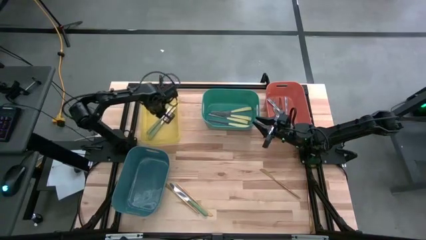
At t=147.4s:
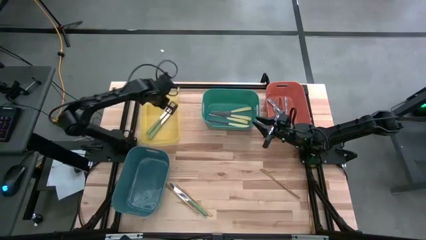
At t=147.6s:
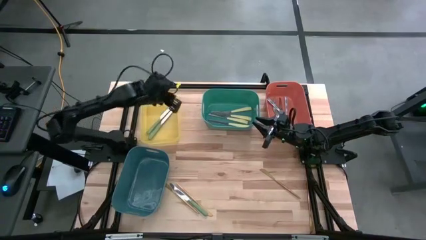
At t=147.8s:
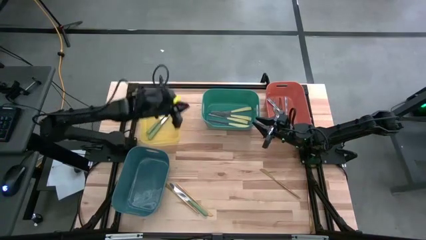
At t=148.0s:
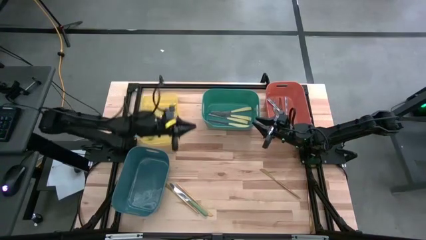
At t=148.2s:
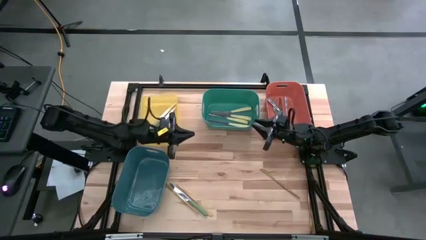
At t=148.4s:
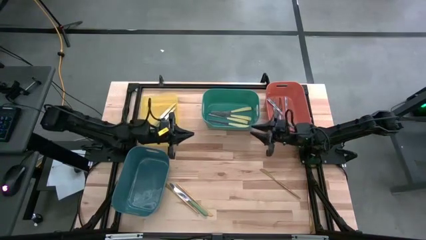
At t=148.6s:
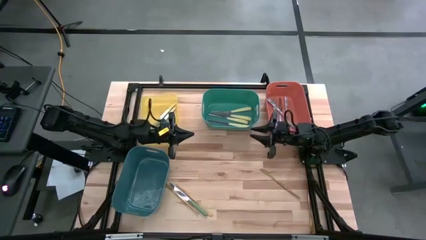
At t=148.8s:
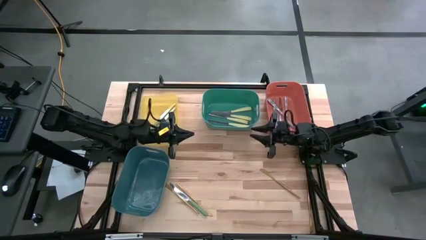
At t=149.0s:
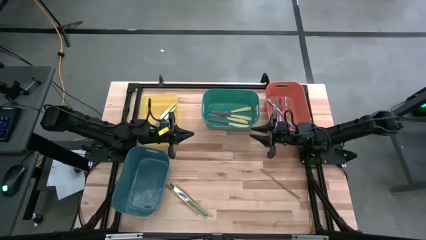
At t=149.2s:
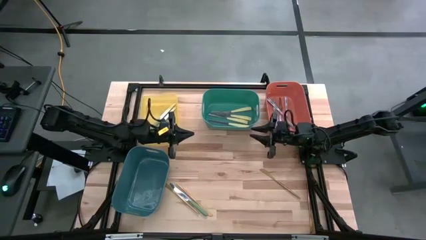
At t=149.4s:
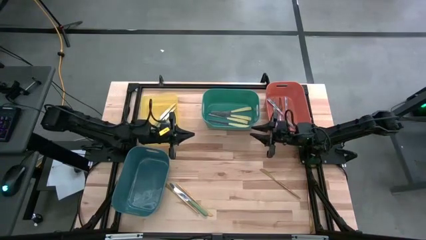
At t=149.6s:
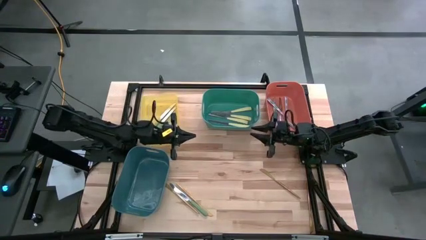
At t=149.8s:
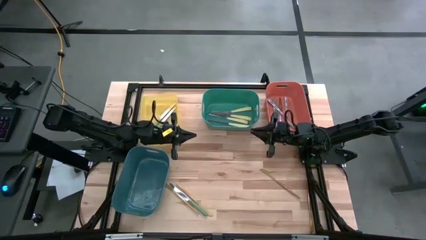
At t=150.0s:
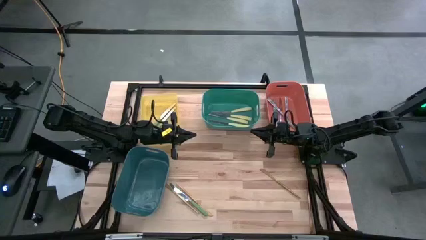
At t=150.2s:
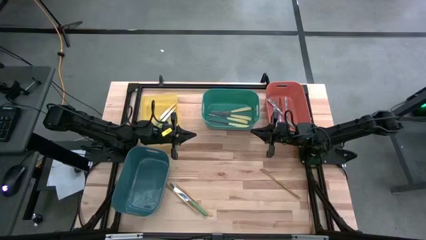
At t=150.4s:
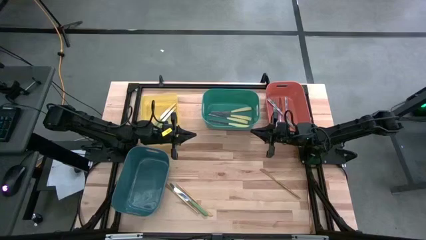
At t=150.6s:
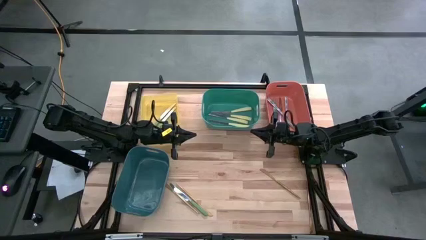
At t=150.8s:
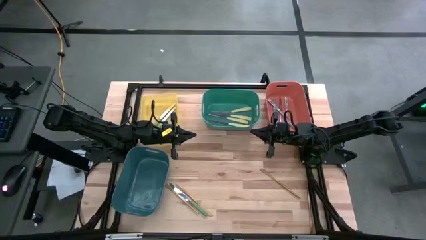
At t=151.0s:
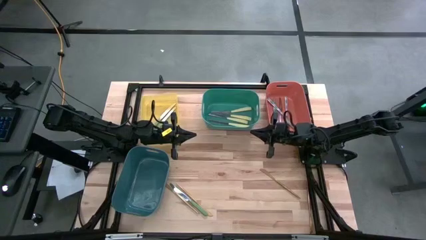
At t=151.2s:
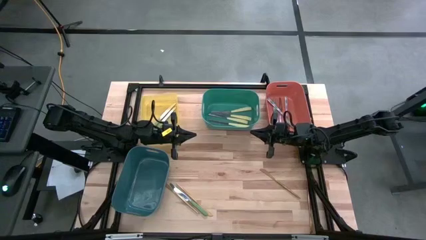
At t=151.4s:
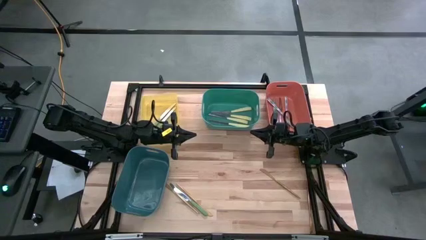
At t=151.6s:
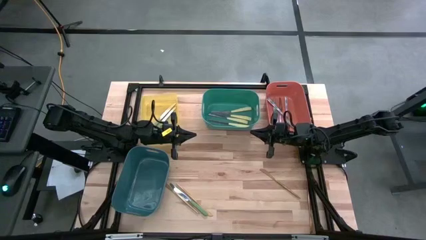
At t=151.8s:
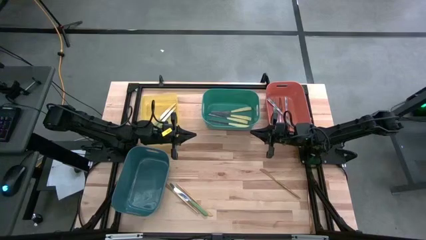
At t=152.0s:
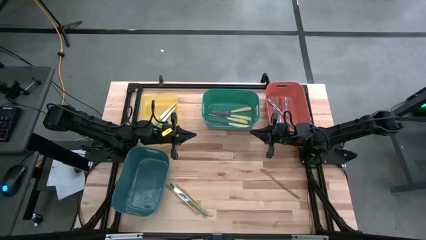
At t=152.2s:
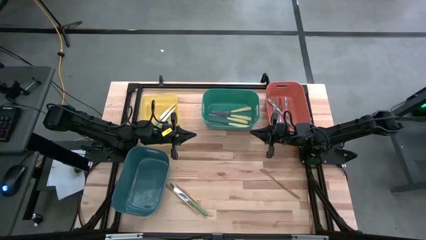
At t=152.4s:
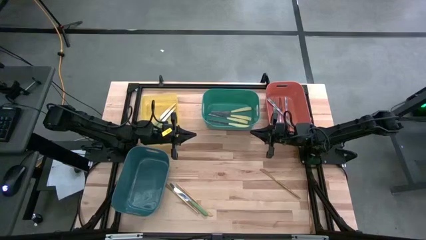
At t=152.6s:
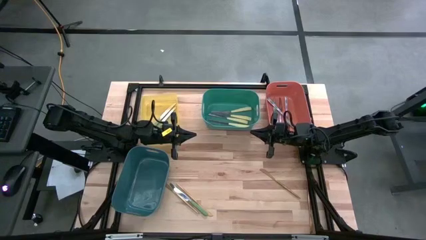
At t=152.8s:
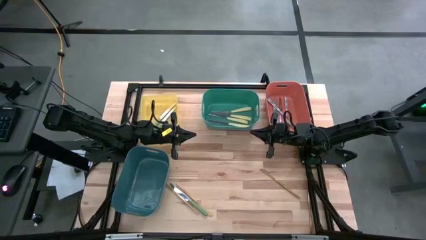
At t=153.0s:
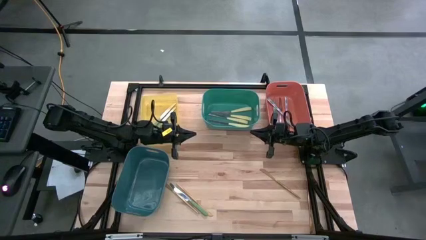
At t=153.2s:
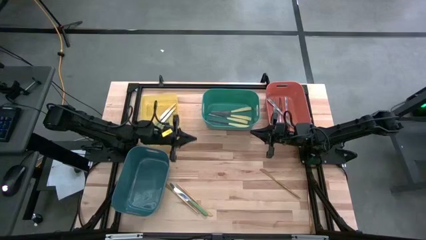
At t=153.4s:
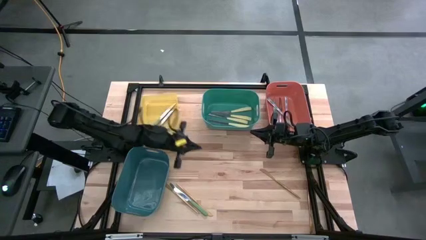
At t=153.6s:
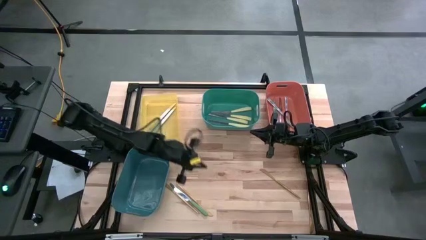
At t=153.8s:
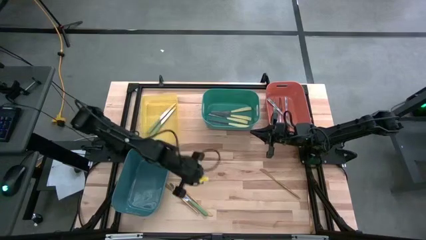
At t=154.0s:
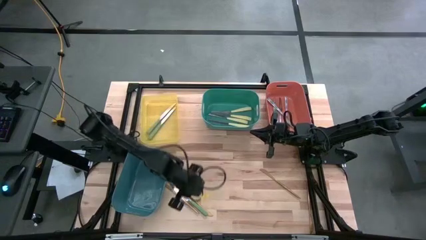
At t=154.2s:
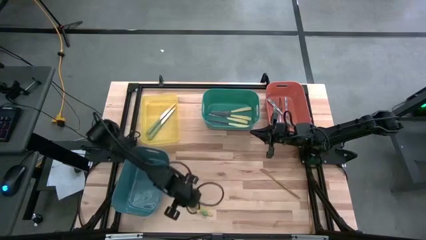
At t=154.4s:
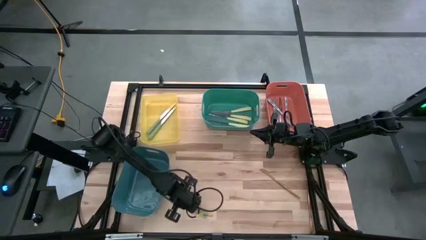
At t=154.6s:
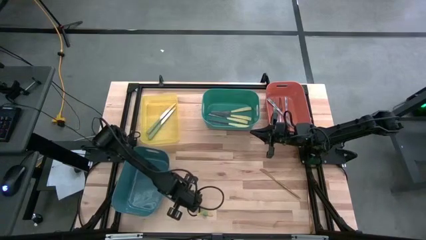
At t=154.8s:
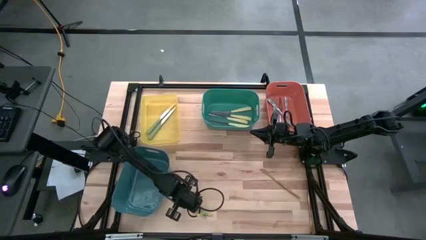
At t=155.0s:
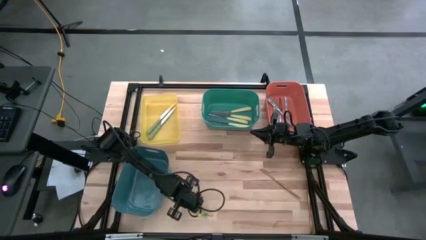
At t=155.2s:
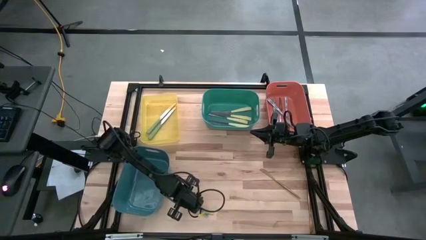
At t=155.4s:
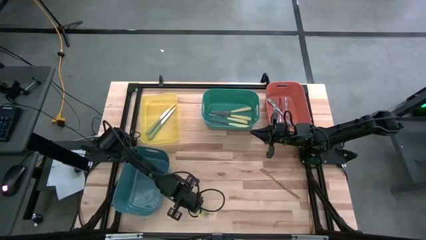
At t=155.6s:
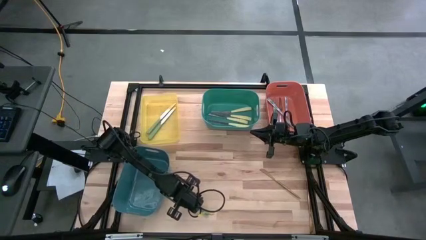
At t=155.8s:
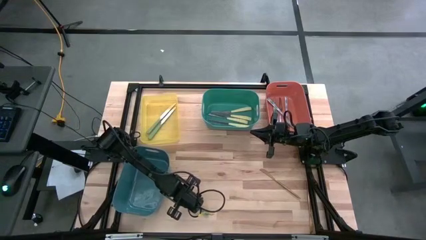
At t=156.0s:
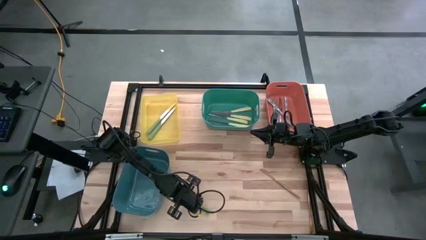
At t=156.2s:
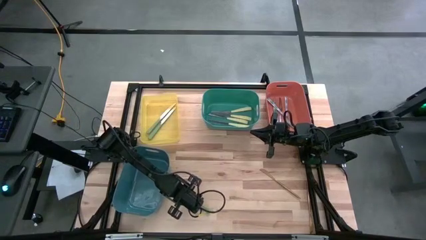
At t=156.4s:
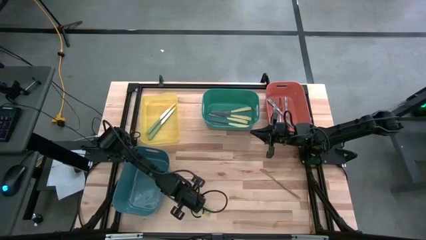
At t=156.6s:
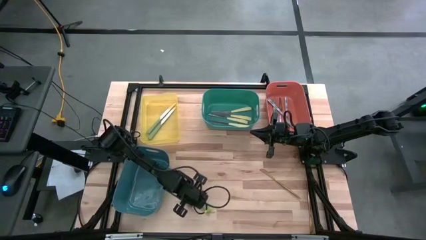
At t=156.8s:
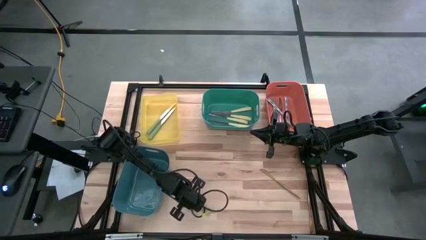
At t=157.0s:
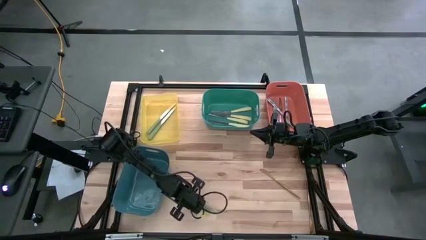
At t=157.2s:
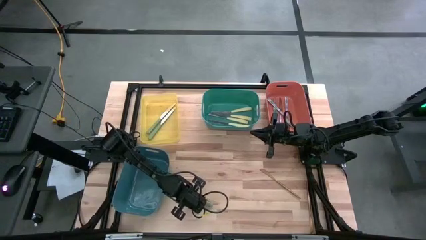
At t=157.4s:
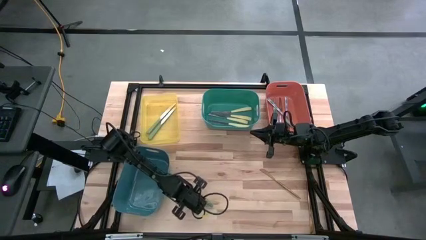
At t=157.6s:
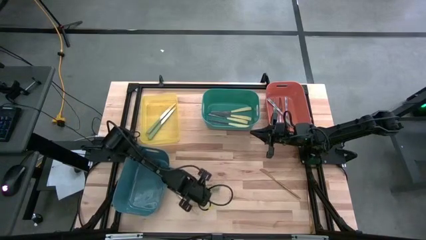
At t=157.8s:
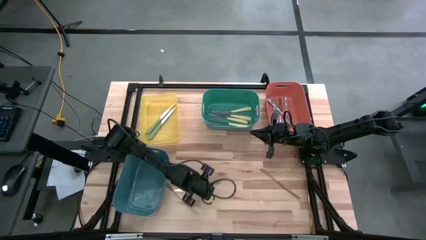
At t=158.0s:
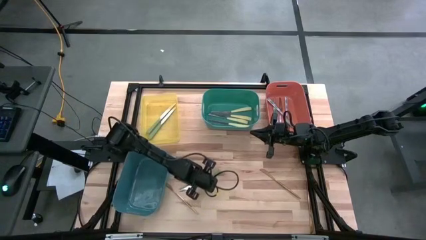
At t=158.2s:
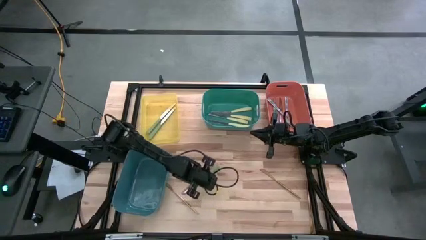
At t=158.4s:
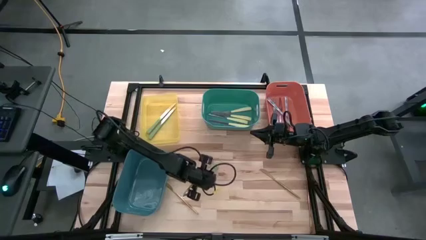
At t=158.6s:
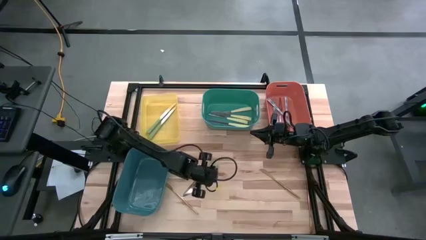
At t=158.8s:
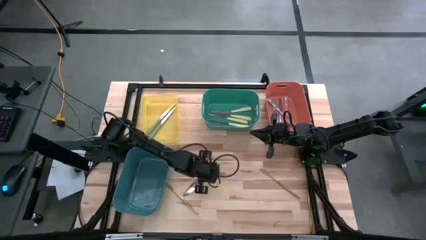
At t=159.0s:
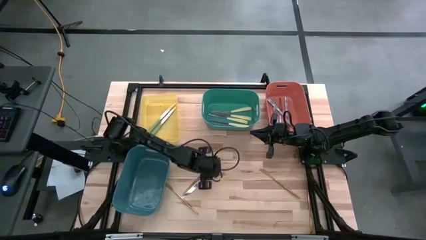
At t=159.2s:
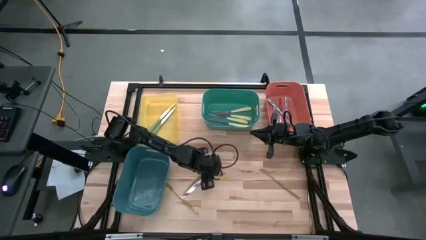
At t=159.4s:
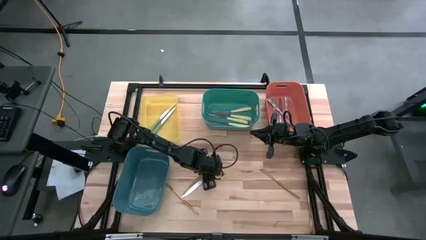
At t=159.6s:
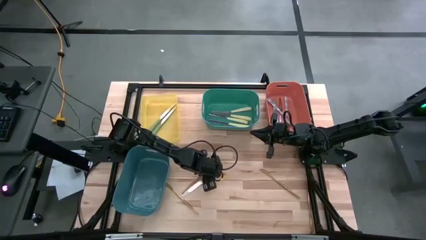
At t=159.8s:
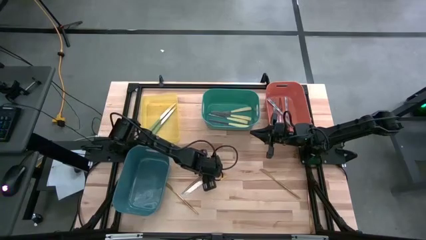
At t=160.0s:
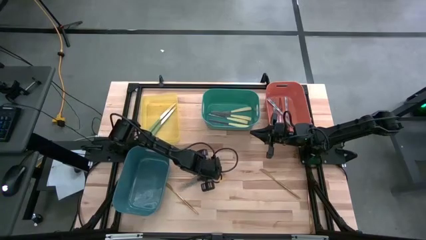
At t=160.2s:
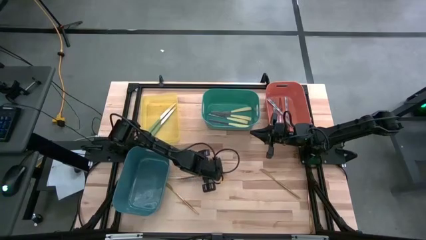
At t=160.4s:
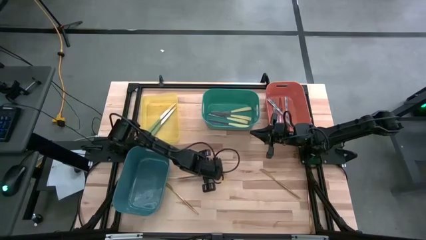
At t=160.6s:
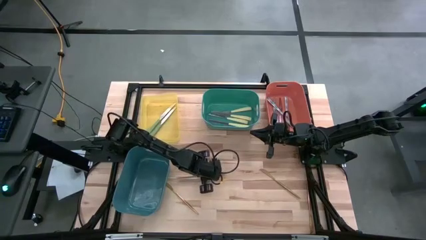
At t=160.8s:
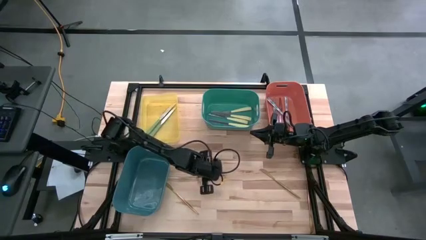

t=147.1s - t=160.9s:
Task: Sort silverware by color (type)
Put the green knife into the yellow bin
